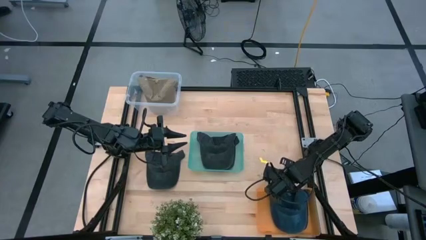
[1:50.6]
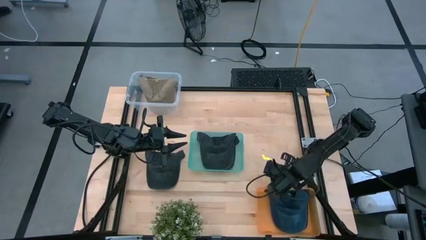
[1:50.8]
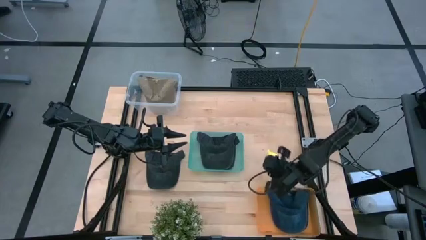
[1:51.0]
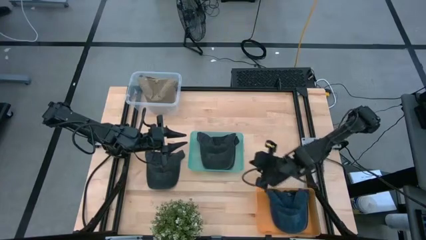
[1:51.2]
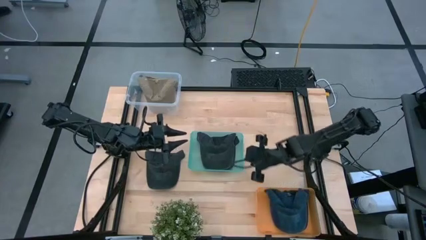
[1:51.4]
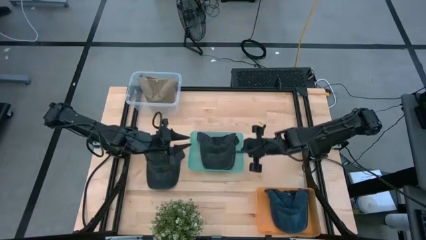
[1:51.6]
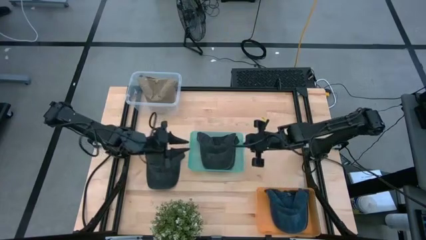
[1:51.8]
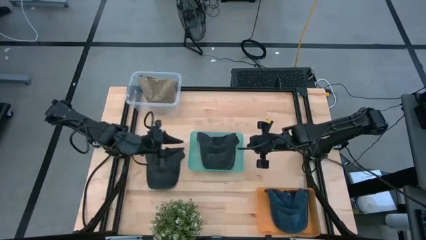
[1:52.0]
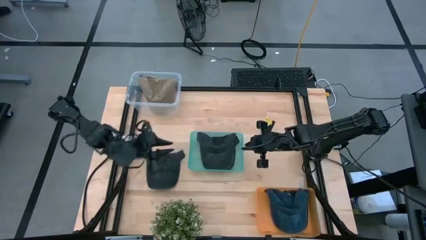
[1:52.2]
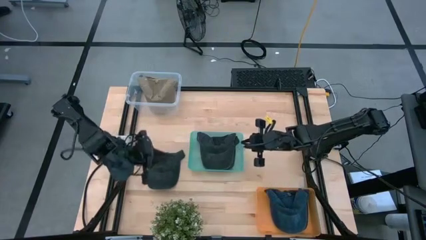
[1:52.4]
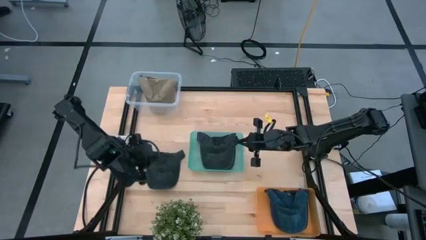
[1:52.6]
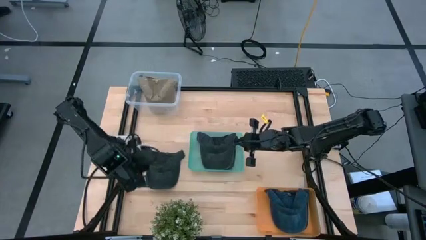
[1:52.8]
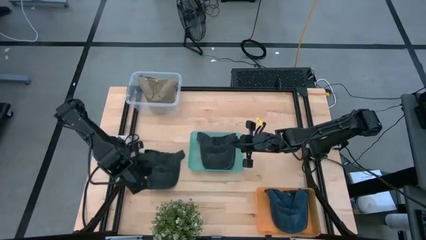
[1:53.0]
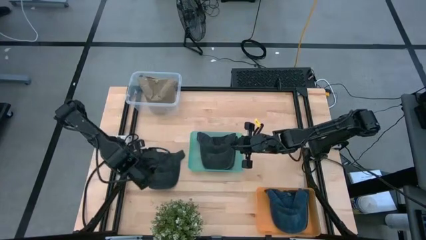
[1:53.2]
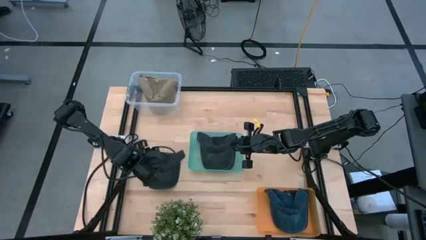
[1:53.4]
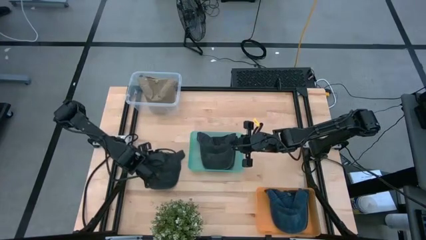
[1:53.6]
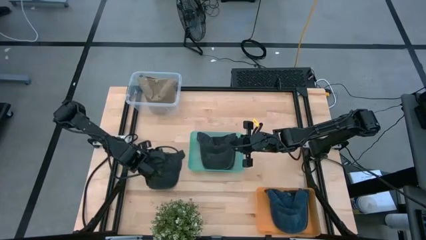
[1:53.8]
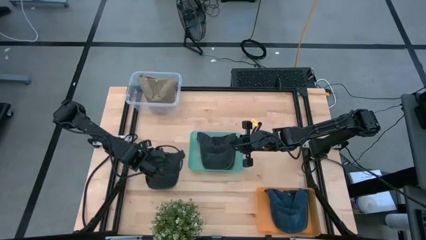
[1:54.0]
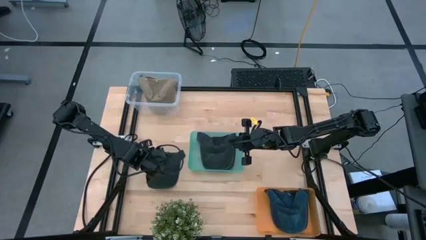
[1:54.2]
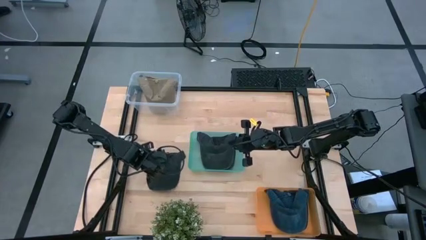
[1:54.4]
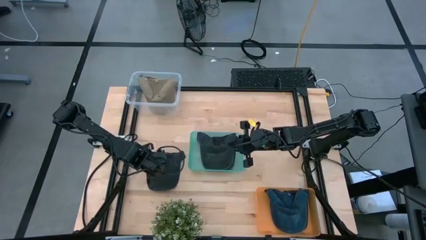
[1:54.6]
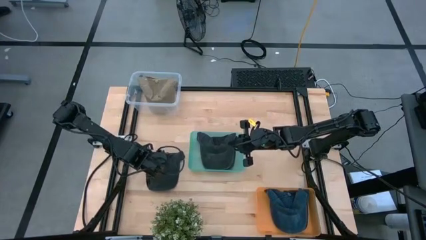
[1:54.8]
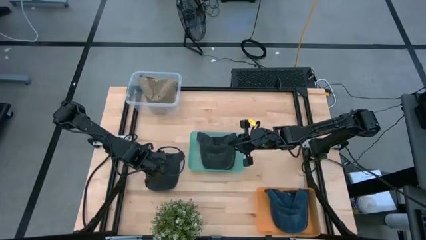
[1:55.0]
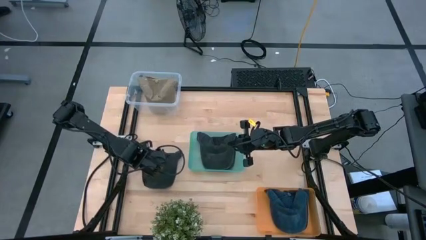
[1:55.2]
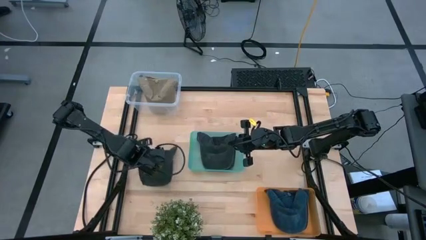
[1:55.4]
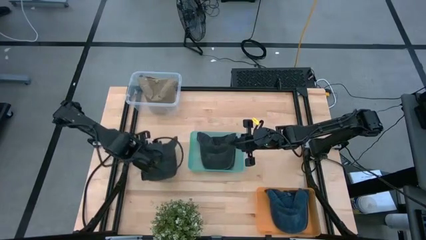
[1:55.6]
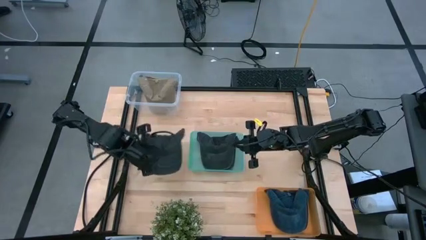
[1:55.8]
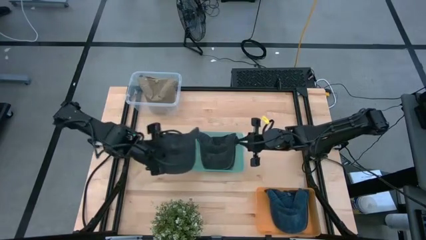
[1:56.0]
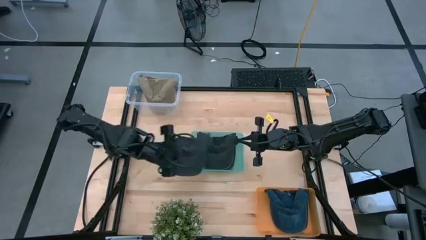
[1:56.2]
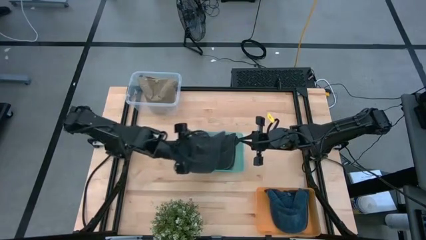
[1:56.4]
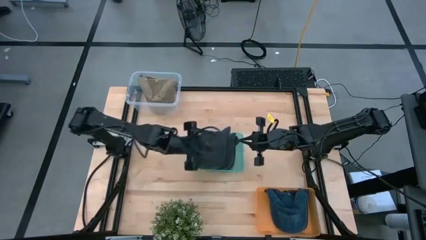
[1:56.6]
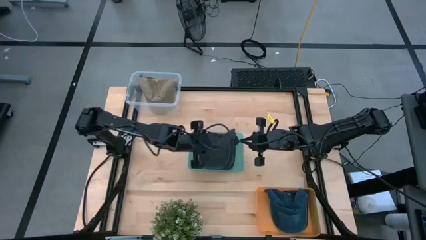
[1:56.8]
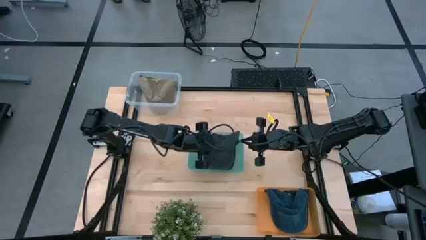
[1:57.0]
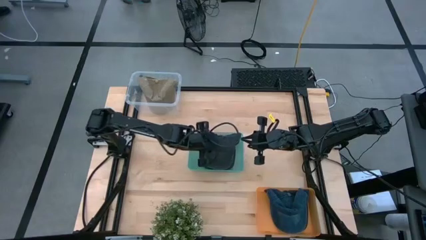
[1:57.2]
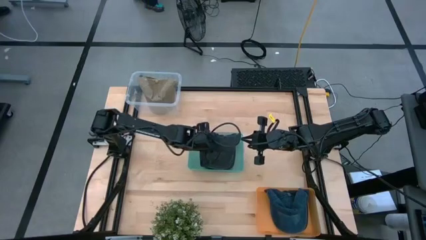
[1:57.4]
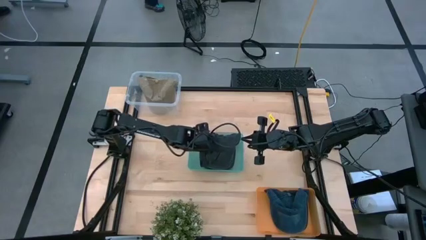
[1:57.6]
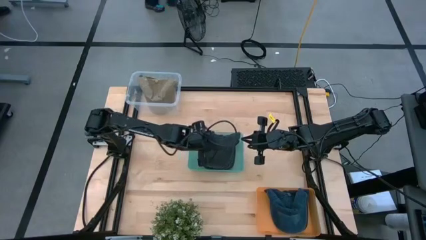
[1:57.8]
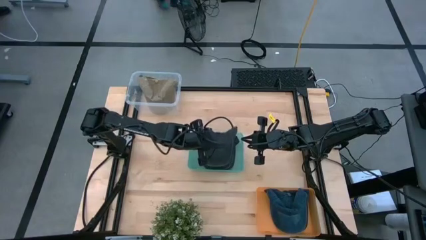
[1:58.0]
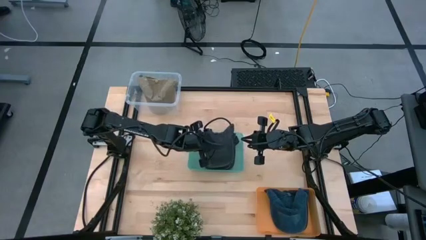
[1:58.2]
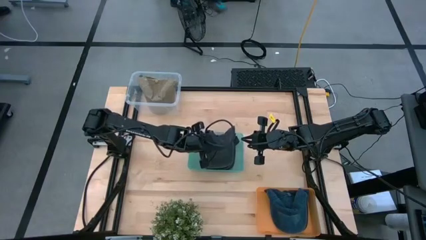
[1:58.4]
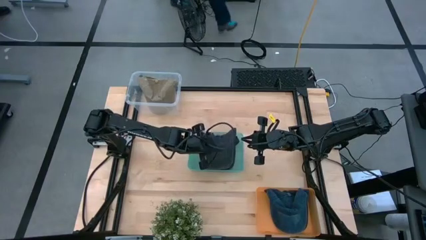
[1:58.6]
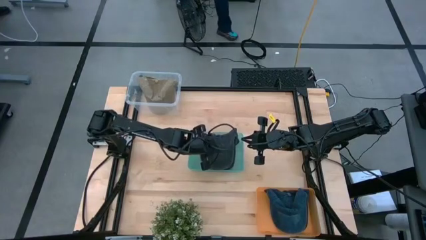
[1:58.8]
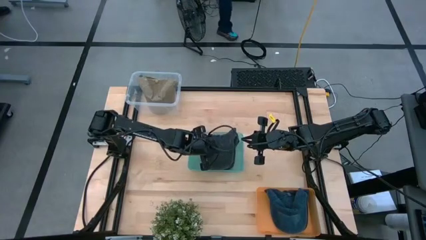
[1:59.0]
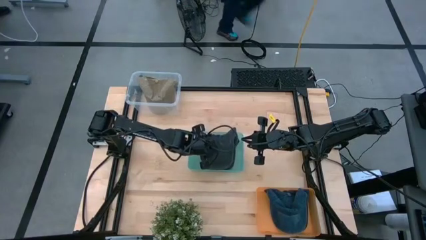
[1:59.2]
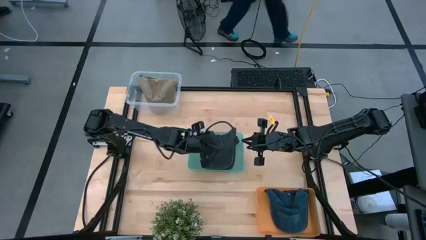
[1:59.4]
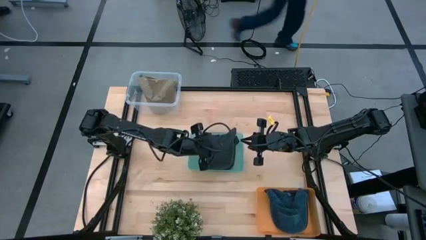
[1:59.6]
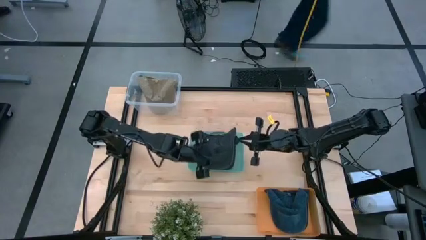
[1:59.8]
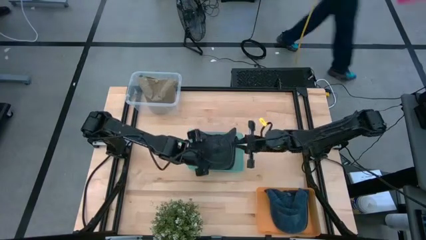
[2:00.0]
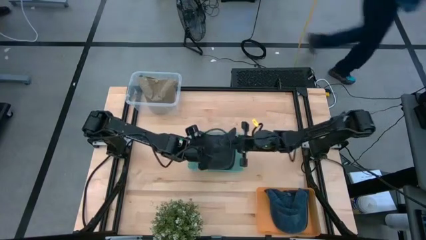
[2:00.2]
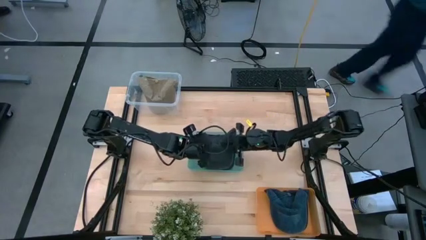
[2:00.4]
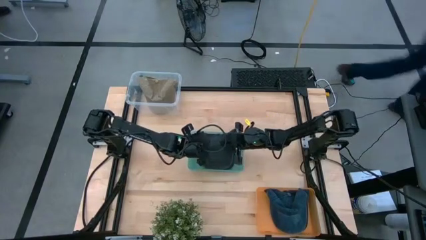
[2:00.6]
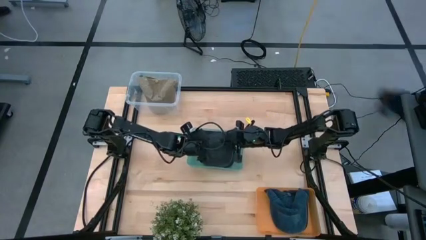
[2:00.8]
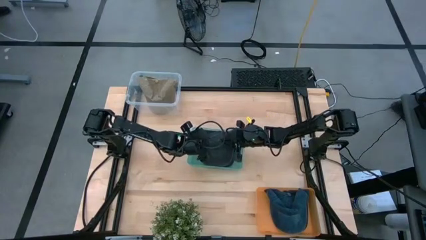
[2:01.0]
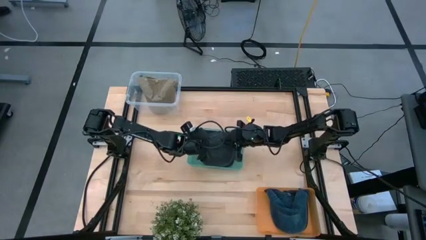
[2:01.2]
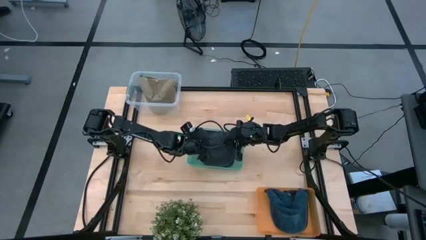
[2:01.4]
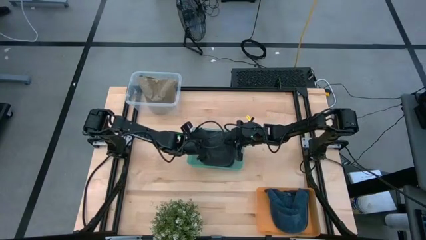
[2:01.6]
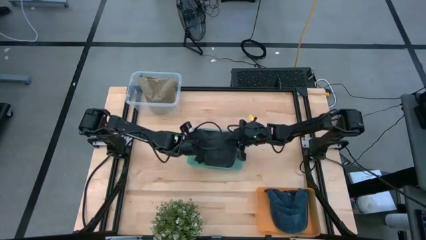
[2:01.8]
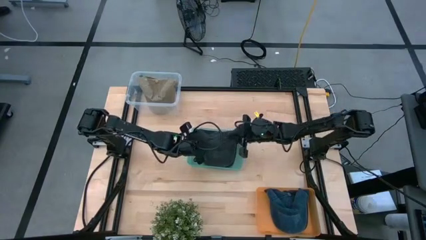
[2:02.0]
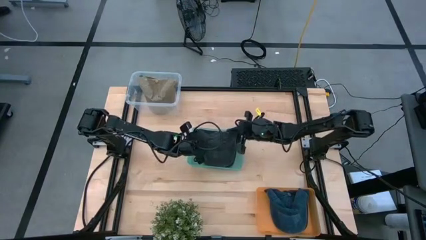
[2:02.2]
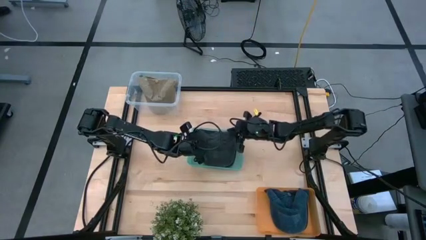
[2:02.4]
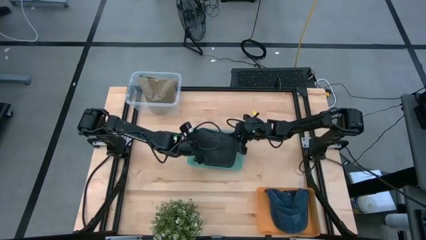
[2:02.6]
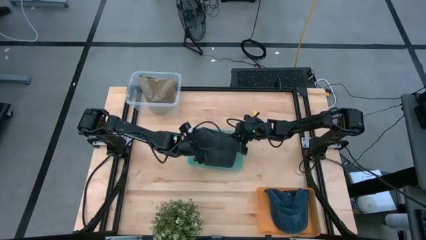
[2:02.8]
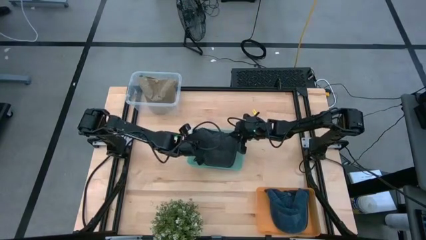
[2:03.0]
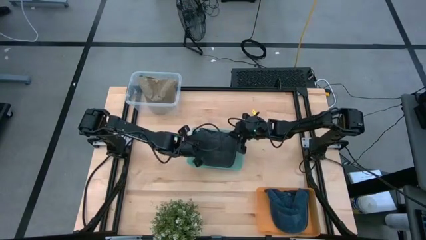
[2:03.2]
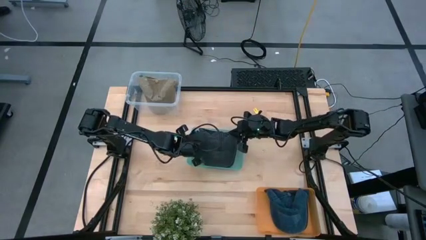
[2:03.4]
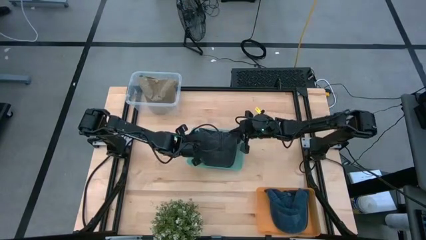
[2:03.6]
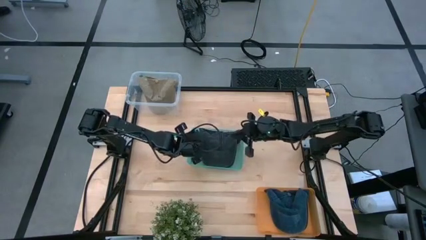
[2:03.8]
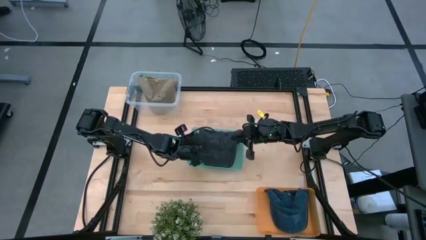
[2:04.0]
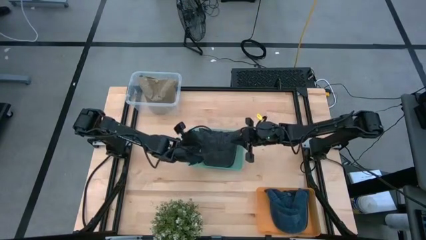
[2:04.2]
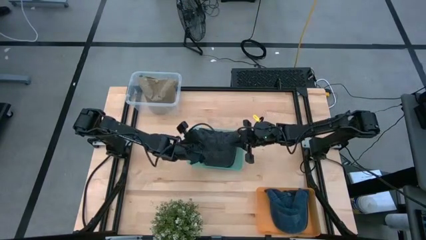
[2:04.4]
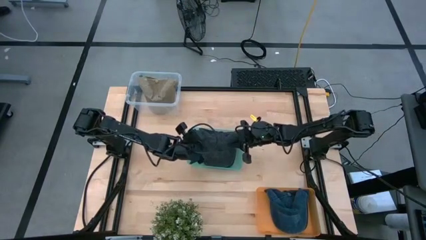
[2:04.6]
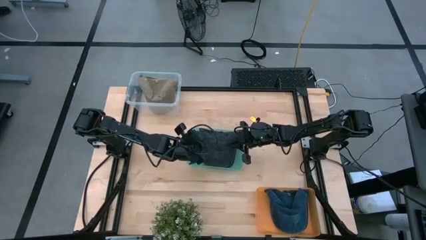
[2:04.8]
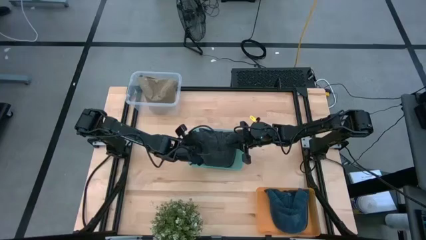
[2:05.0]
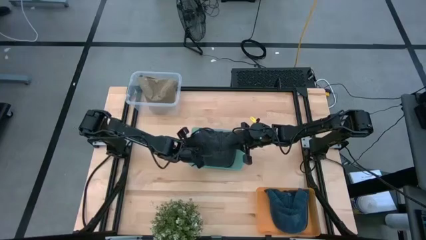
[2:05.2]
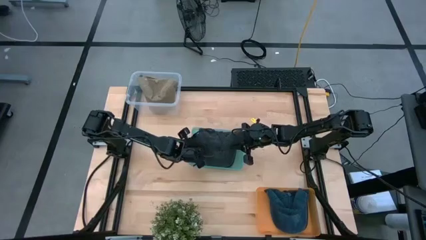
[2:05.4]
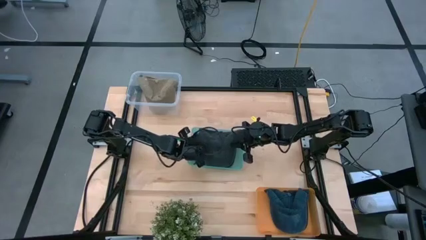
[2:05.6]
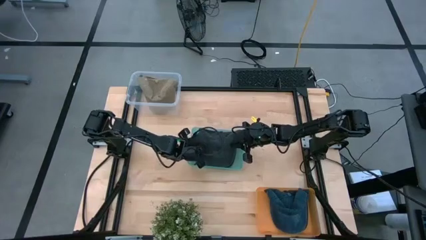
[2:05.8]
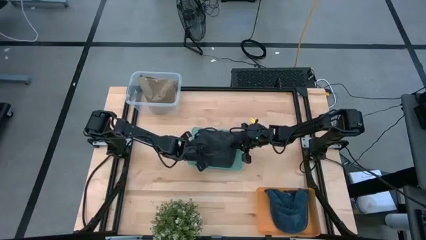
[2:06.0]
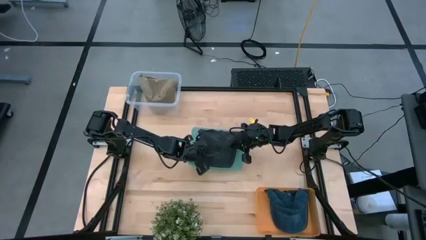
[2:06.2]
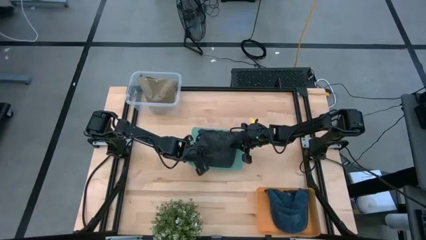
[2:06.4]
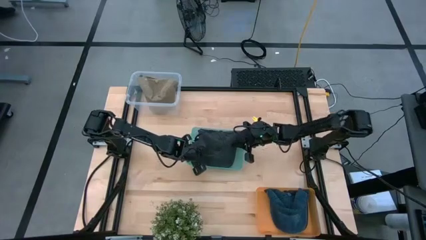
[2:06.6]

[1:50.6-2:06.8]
Task: Pick & Place hat
Put the black cap into the green bin
